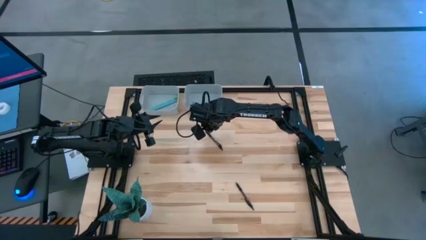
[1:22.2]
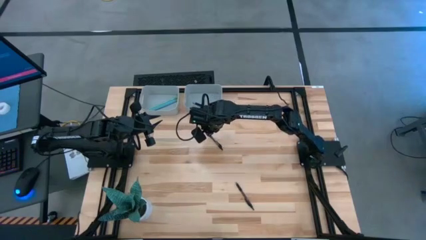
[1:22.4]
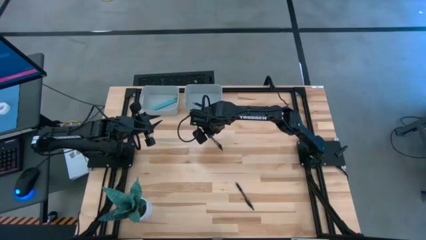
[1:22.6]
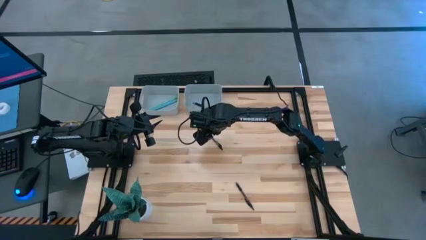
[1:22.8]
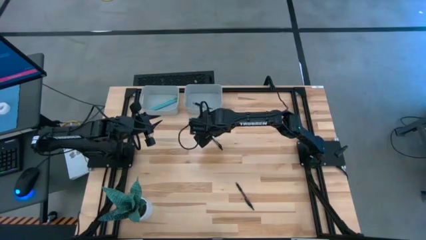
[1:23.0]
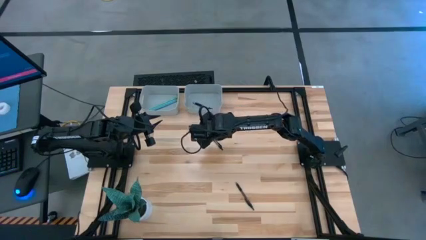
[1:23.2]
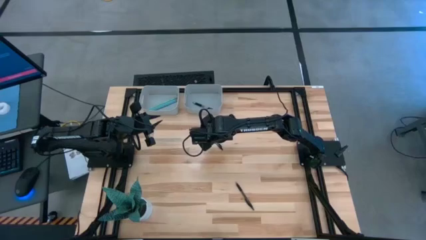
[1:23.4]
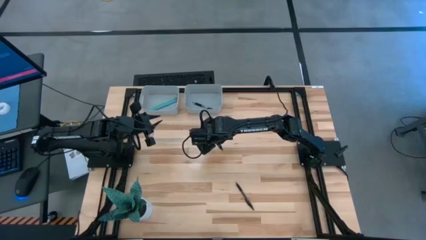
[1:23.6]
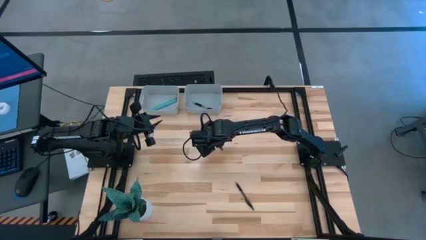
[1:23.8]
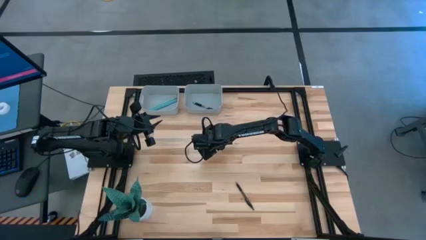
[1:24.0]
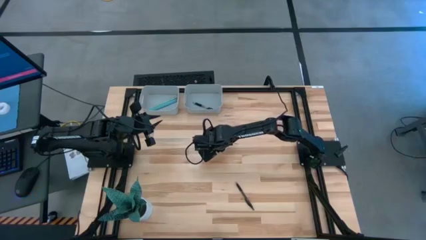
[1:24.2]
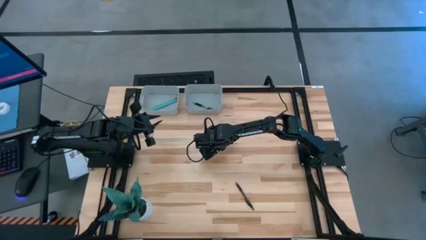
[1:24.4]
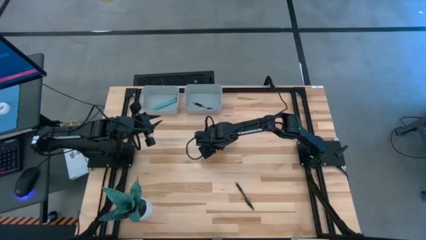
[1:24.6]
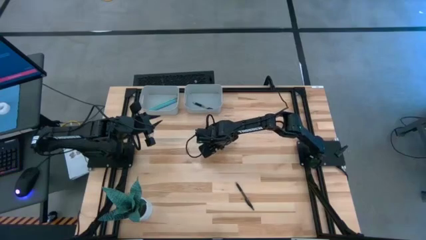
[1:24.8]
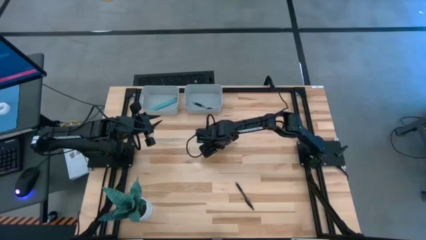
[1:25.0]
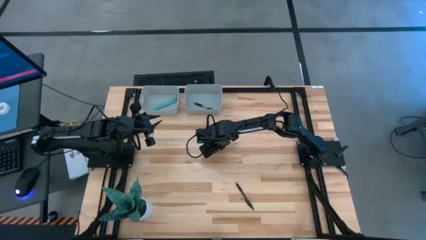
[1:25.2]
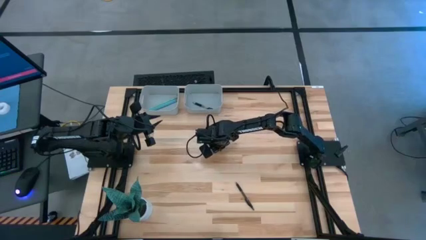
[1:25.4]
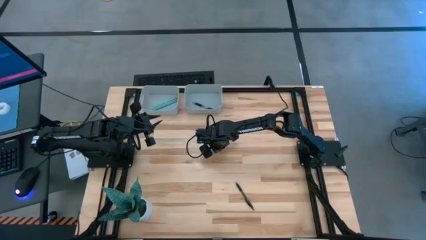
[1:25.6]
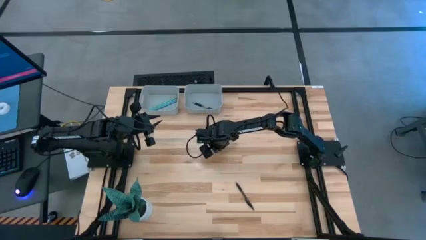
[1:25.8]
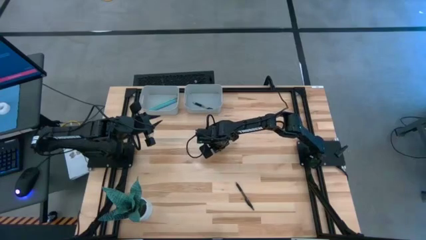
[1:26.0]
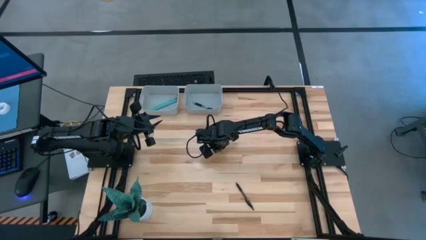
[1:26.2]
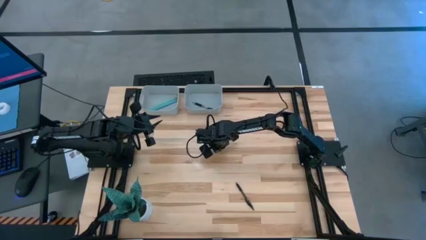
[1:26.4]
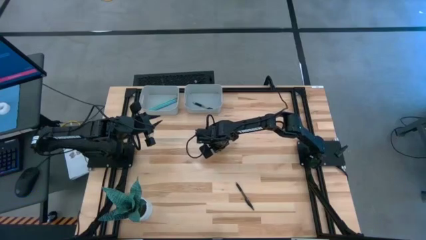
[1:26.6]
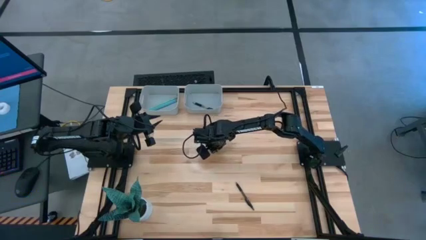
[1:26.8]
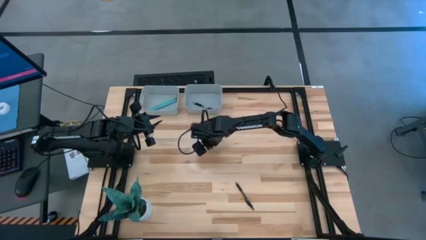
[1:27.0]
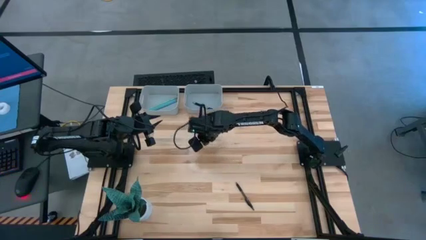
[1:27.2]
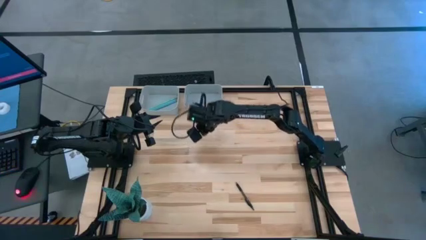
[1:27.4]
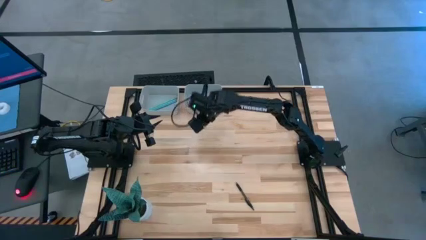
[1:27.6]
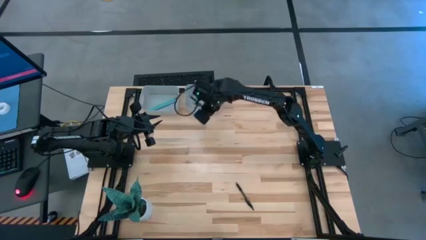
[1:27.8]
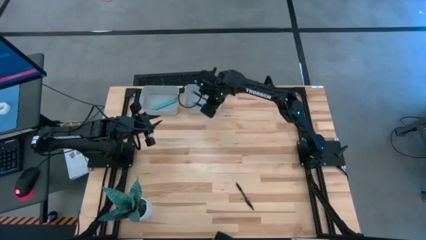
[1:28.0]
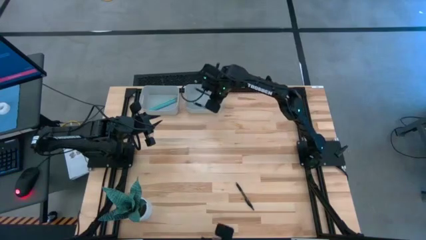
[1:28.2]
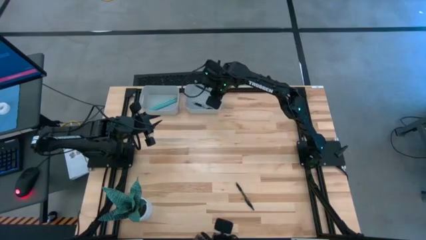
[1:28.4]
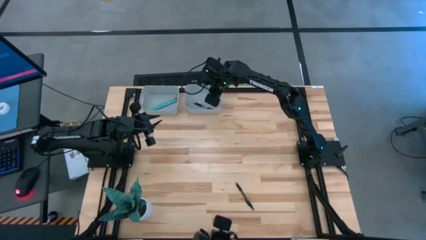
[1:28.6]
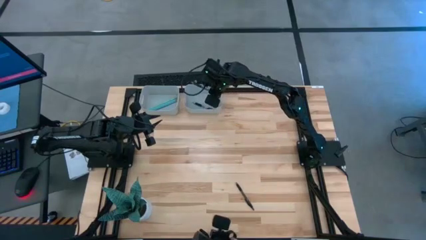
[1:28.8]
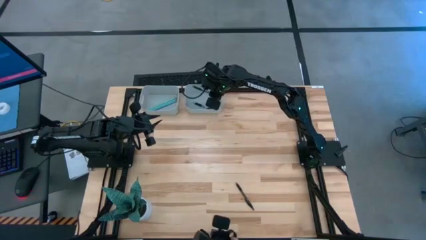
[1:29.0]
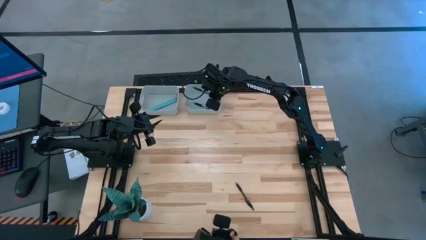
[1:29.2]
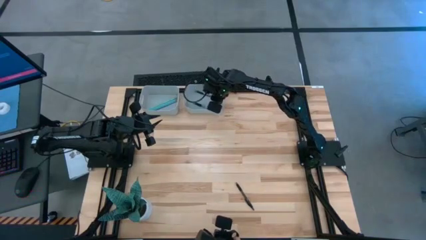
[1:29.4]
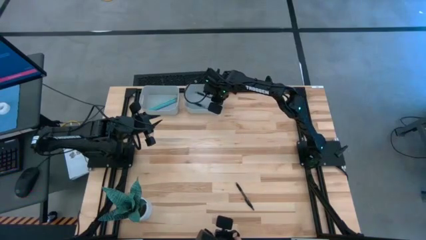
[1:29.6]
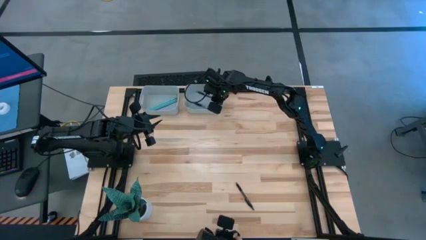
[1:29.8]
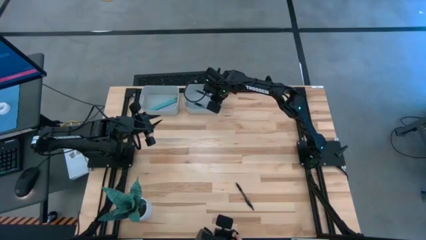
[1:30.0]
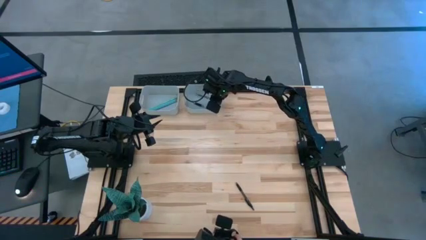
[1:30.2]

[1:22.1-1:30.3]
Task: Sort pens & pencils
Put the top black pen into the right gray bin

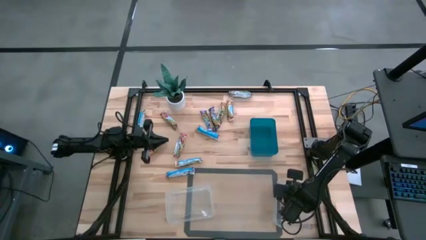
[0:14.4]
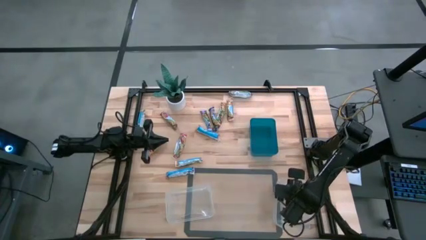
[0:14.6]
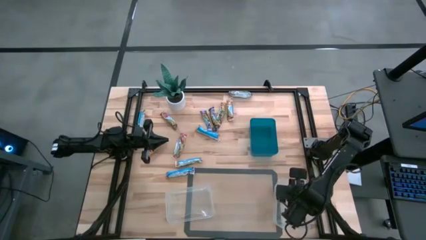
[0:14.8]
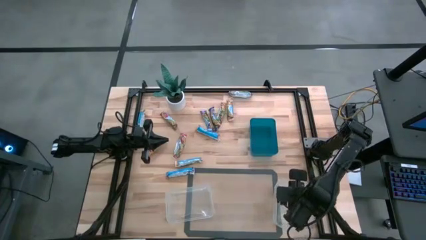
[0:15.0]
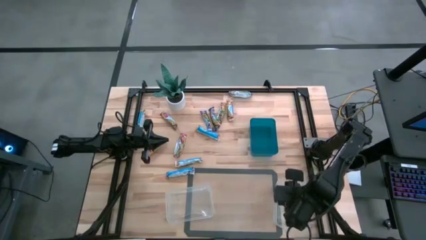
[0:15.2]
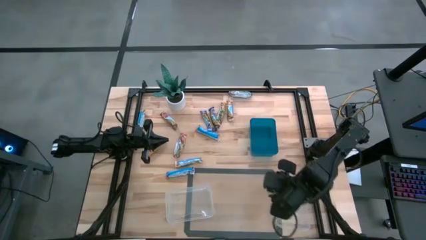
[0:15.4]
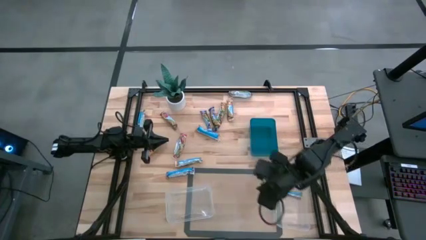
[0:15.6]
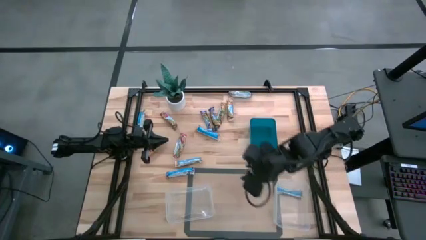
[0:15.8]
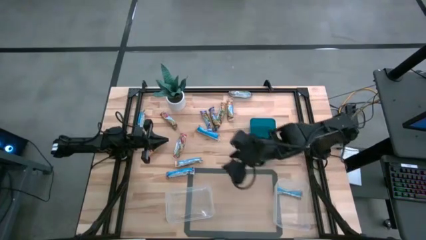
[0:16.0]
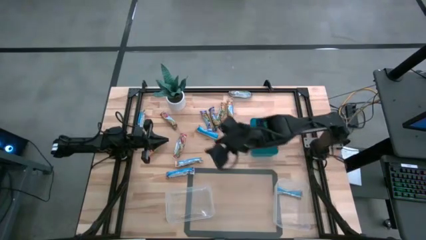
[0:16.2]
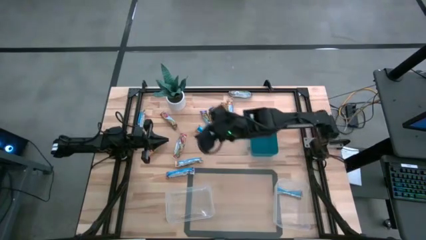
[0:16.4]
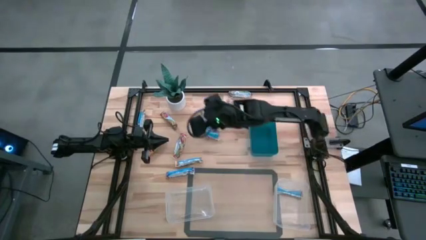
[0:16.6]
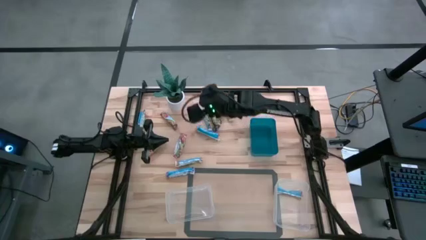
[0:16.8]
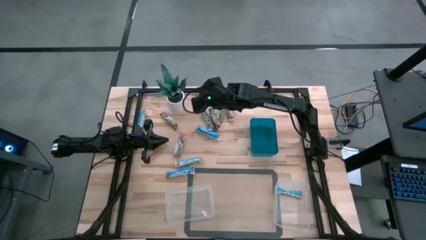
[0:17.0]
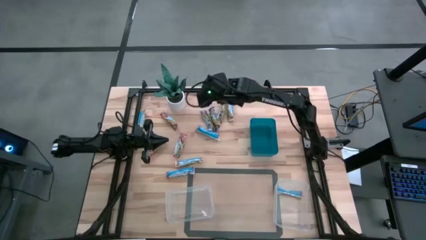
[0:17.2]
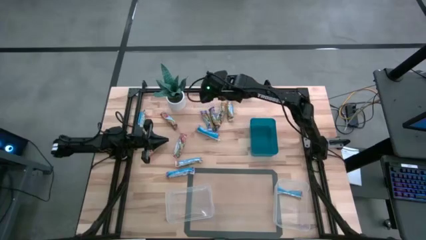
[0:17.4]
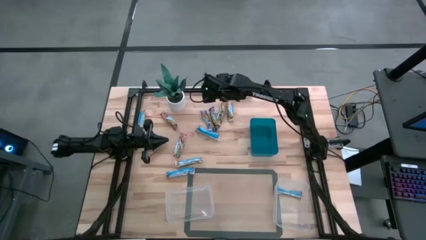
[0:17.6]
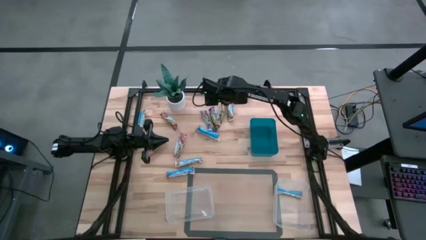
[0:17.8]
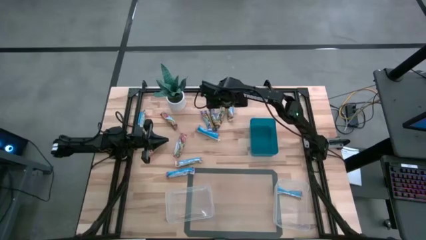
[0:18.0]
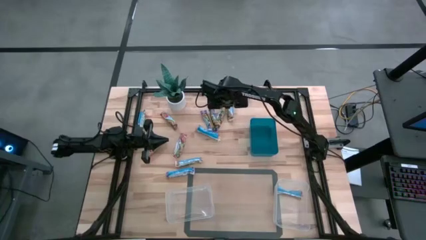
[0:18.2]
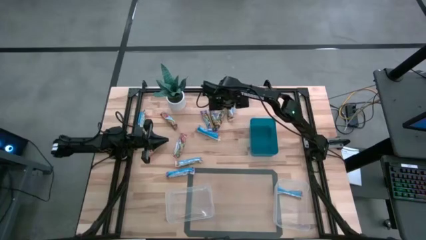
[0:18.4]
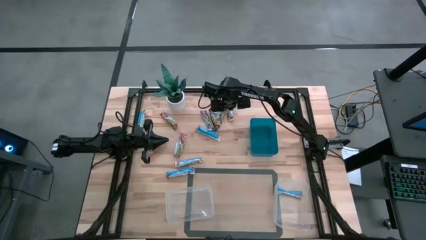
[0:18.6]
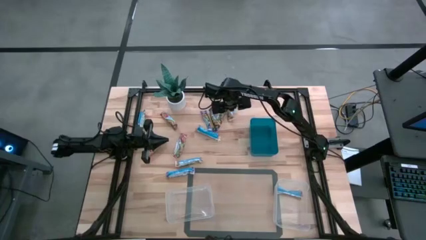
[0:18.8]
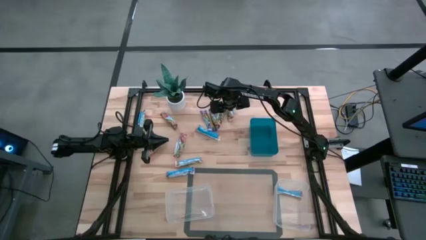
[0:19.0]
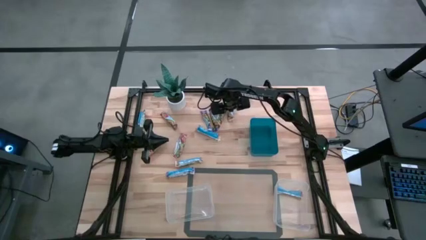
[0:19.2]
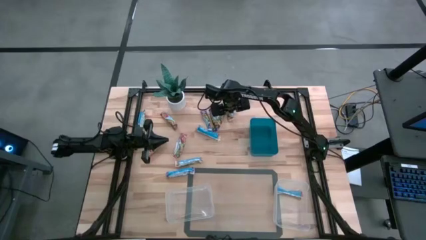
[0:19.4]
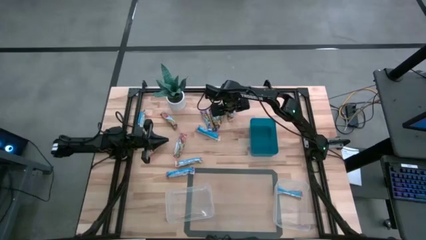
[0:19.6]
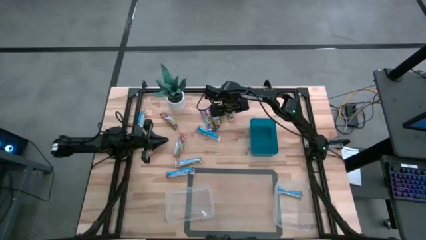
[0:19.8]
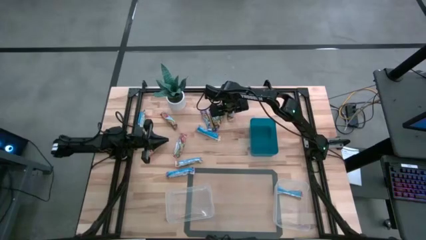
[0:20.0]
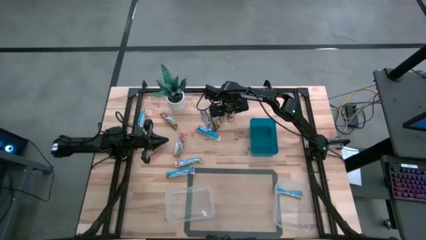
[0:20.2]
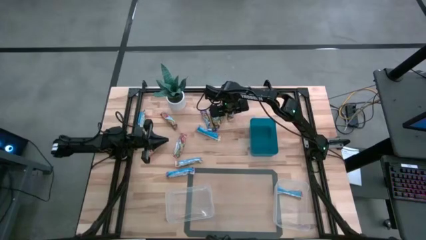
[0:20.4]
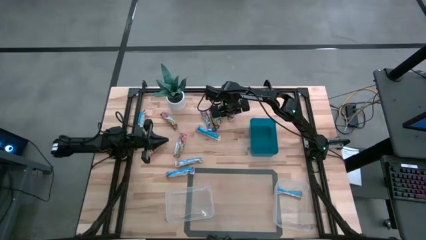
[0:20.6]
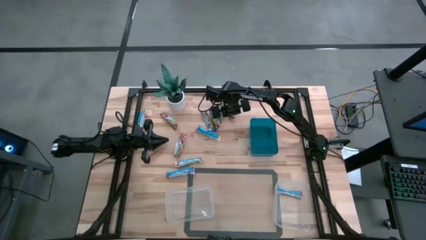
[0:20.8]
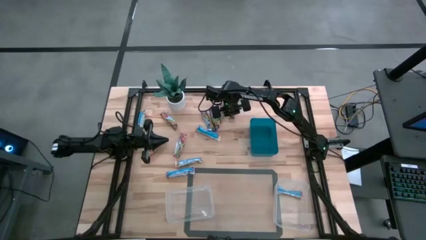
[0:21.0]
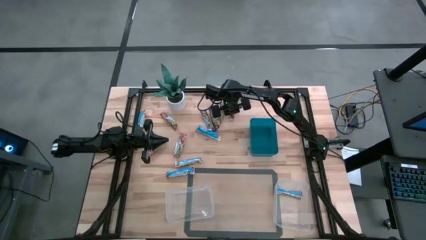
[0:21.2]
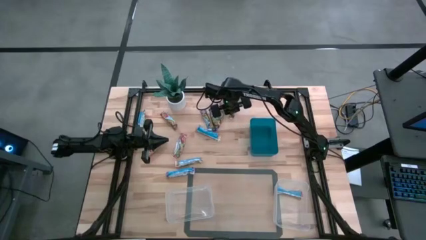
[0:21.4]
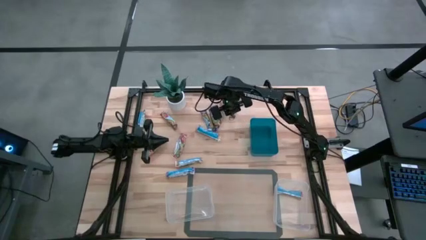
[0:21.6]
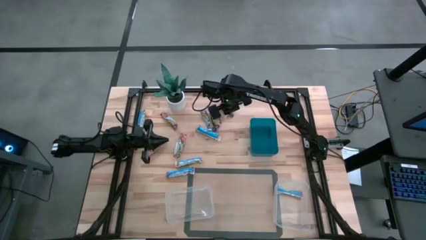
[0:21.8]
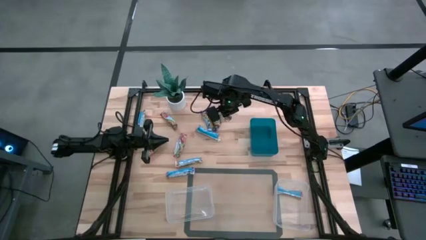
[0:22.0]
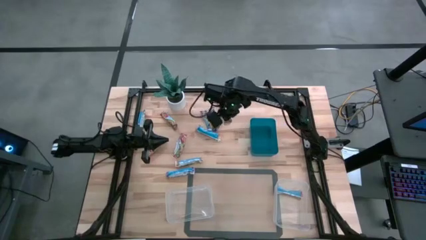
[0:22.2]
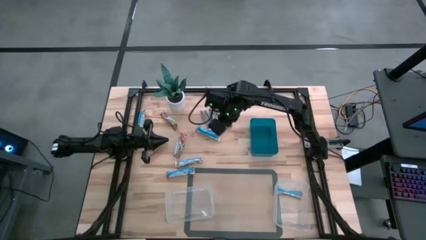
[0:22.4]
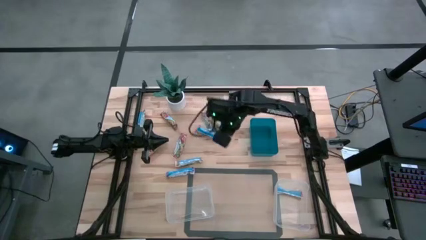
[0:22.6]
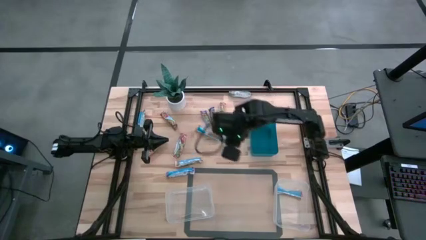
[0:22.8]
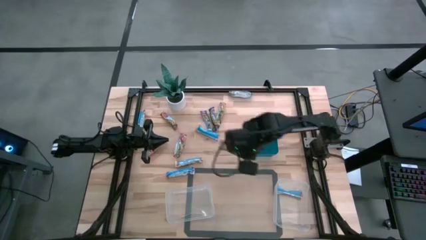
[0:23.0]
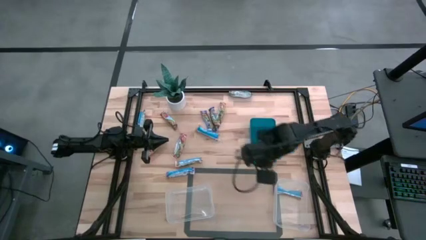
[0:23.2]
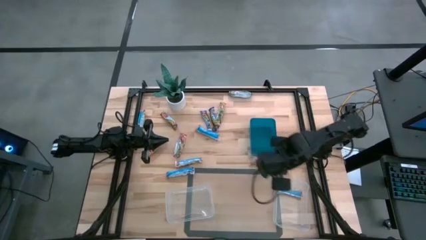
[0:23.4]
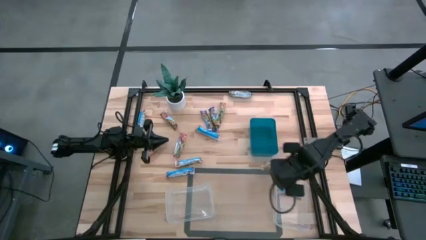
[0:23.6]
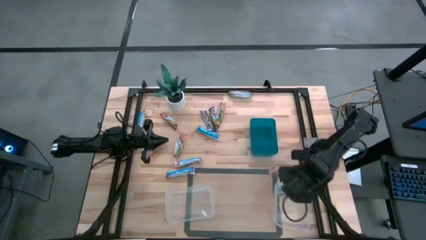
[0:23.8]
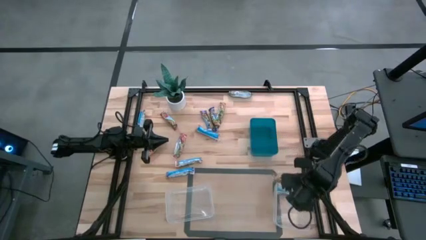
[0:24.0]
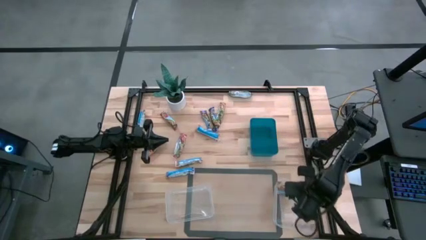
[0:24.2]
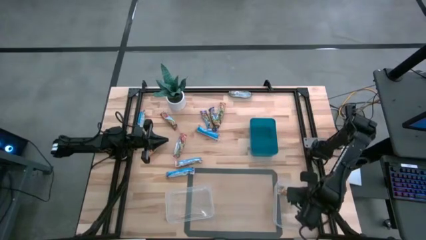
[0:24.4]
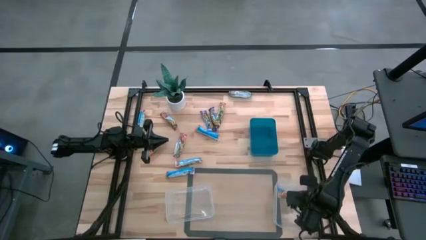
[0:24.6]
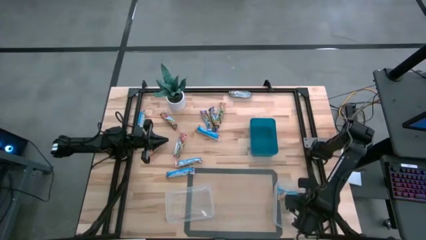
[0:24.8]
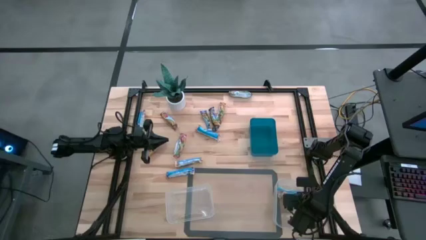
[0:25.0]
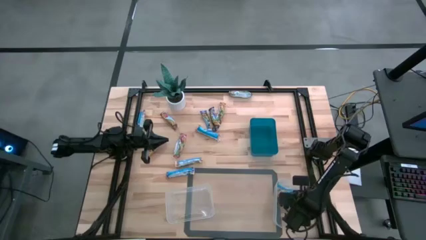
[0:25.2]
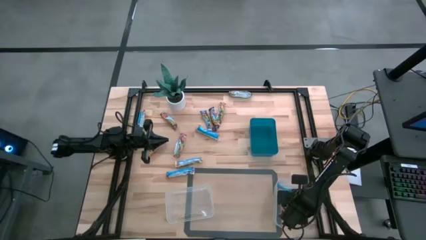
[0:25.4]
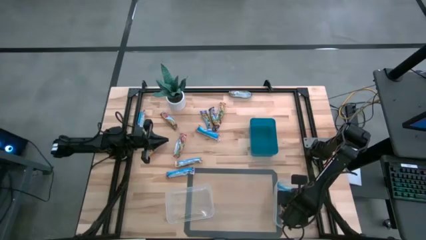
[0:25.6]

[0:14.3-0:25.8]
Task: Pick and place Granola Bars by type
Put the yellow granola bar into the right transparent bin
